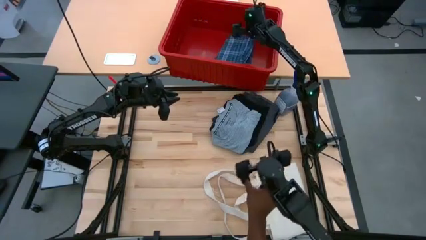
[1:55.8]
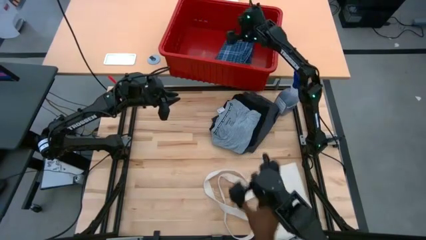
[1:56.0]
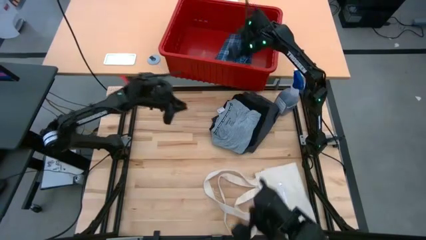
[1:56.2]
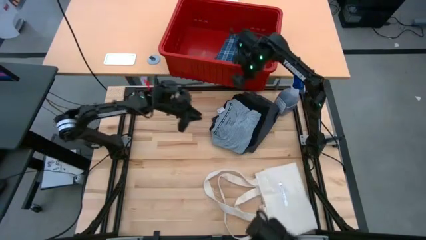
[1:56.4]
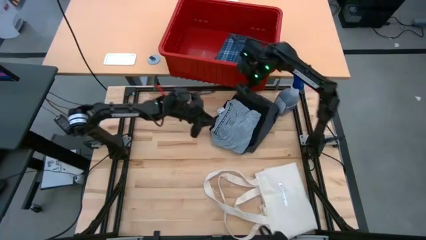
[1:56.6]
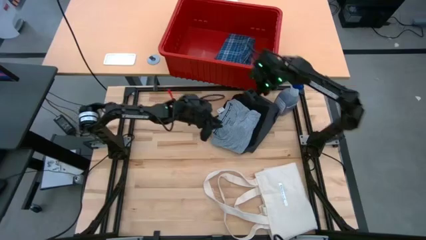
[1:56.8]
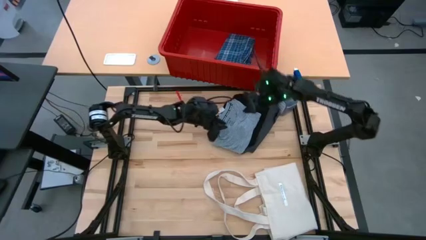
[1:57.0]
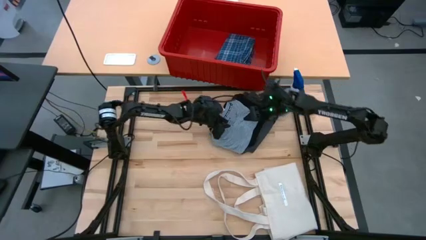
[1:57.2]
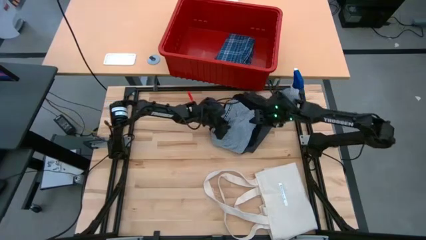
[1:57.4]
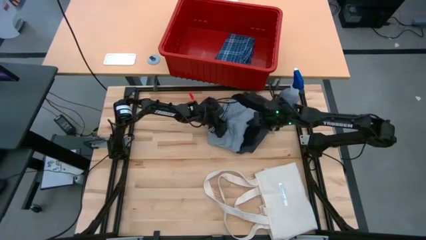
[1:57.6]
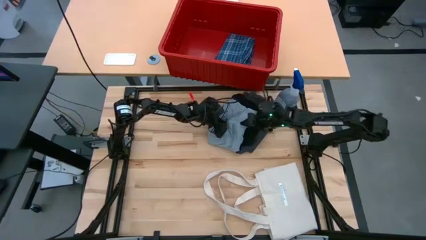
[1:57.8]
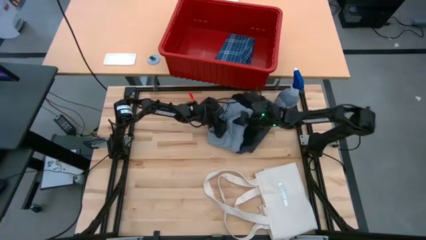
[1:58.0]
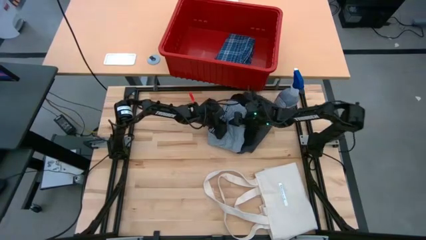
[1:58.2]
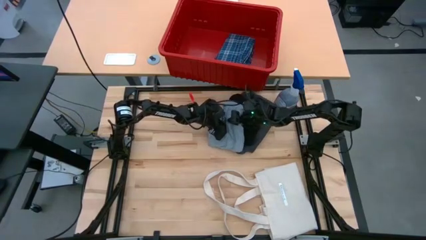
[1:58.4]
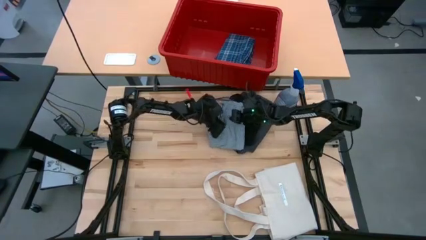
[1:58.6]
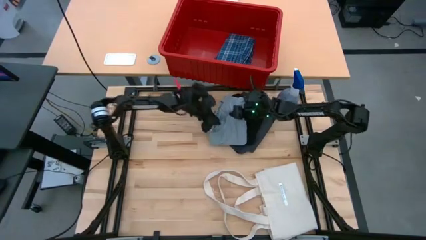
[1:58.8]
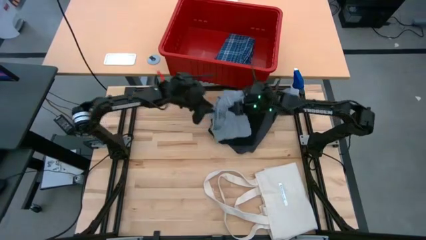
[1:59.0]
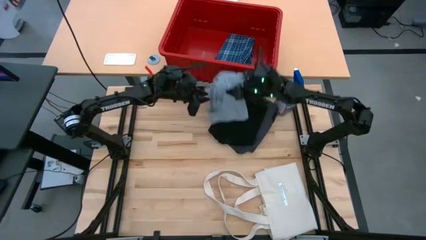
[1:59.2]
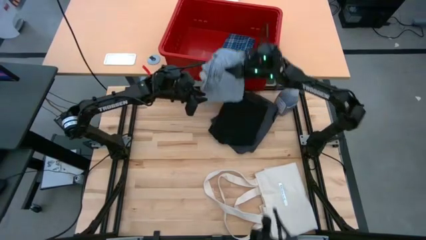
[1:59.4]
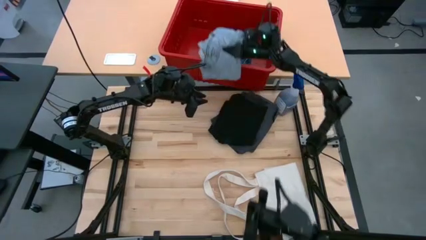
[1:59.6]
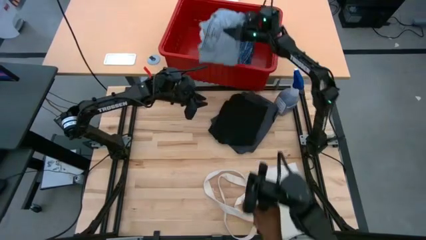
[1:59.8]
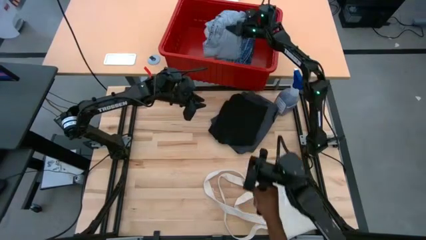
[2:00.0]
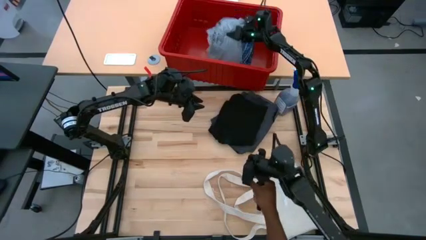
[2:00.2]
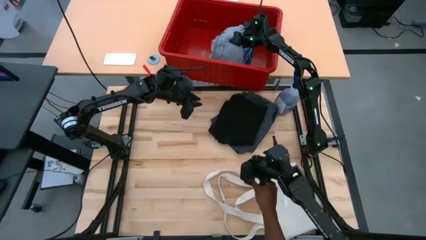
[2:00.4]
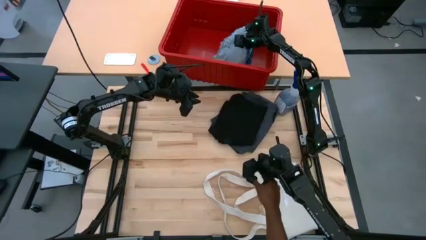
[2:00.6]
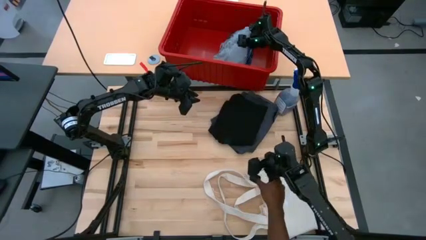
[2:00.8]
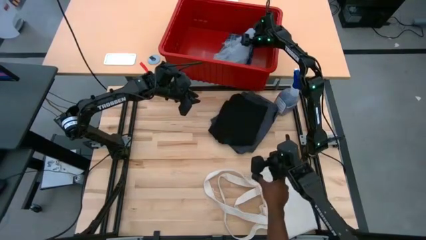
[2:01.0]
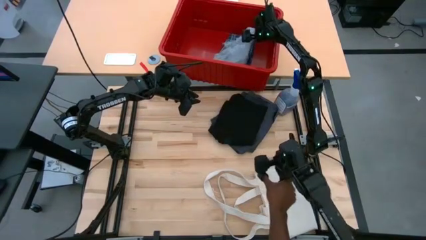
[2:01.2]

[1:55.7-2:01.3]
Task: Fold laundry
Put the gray shirt into the red organizer bin

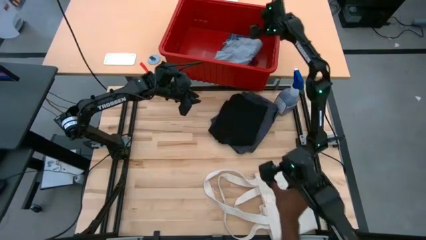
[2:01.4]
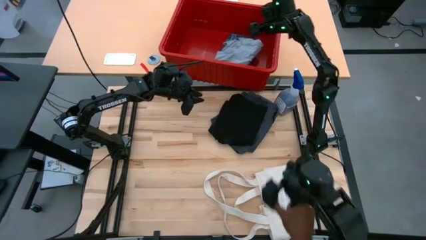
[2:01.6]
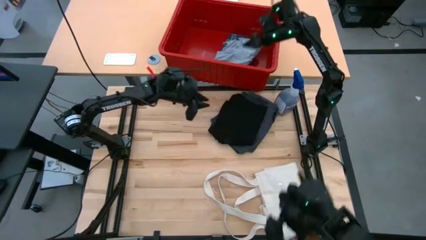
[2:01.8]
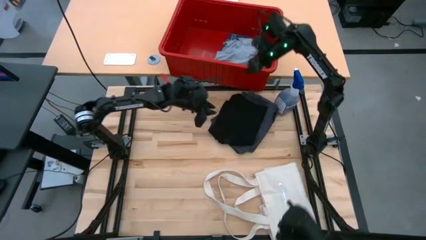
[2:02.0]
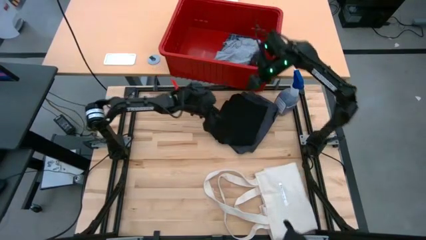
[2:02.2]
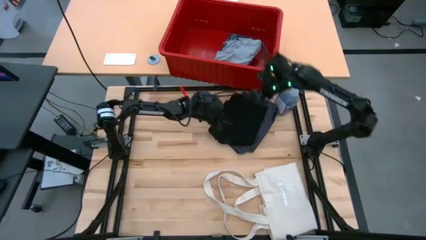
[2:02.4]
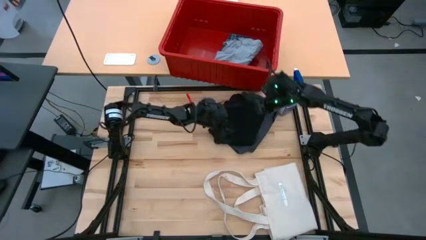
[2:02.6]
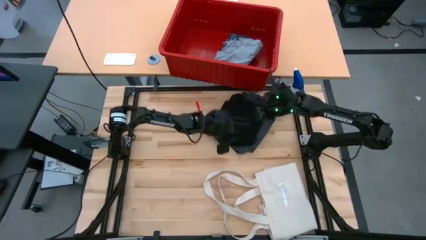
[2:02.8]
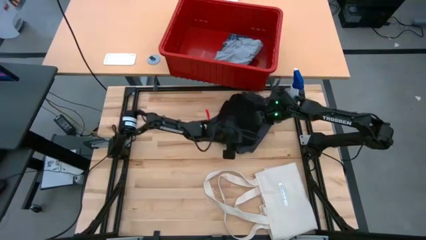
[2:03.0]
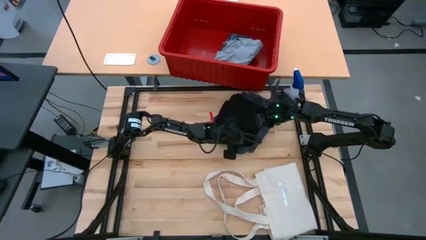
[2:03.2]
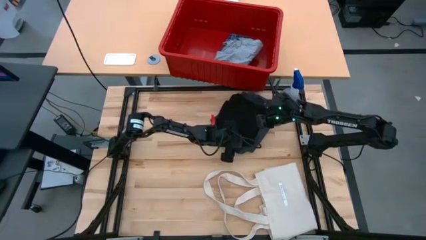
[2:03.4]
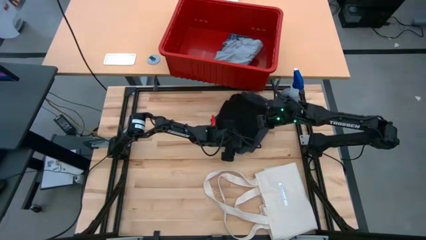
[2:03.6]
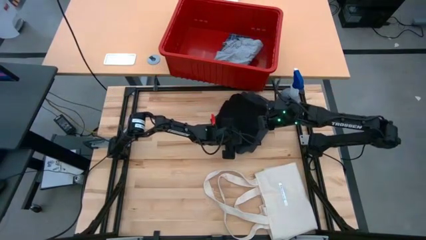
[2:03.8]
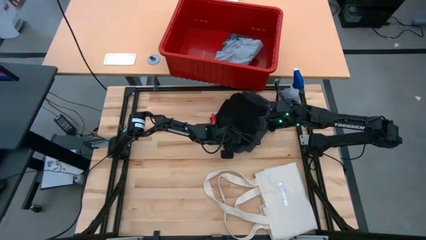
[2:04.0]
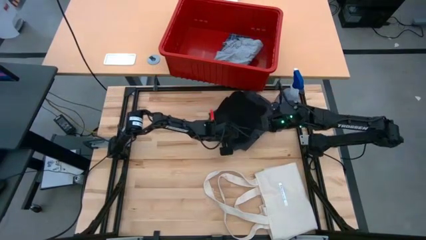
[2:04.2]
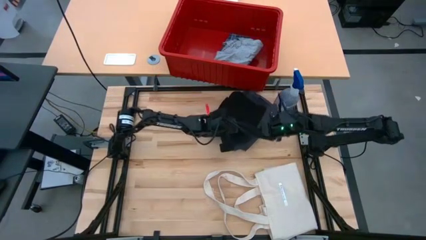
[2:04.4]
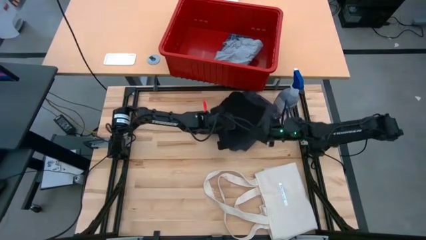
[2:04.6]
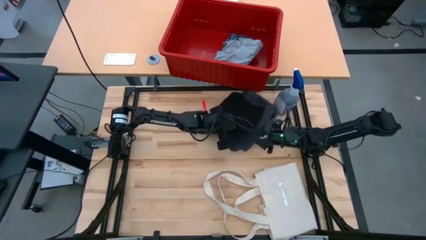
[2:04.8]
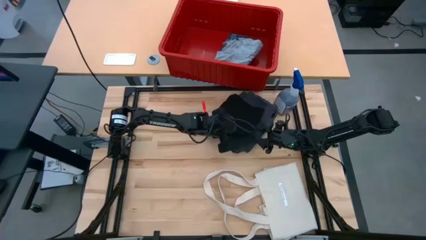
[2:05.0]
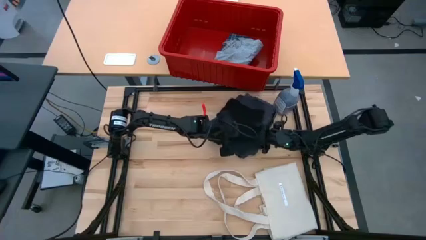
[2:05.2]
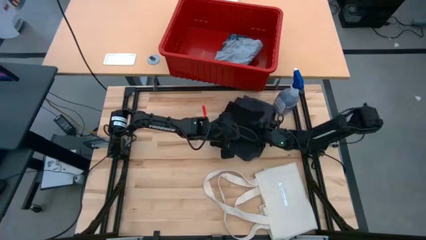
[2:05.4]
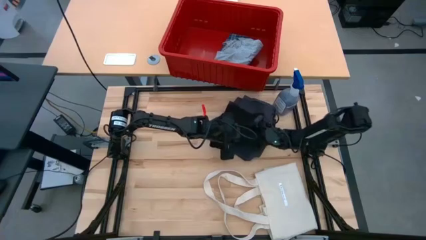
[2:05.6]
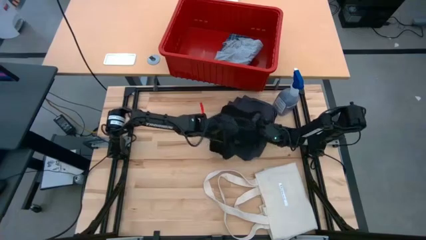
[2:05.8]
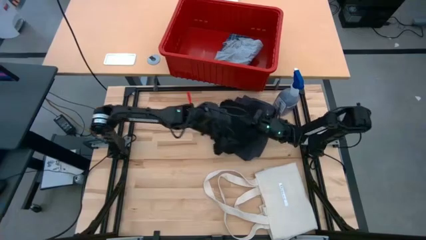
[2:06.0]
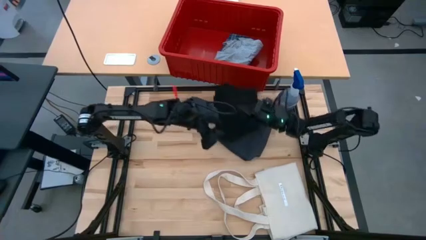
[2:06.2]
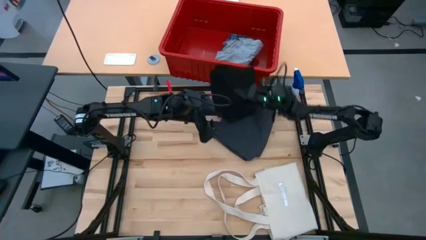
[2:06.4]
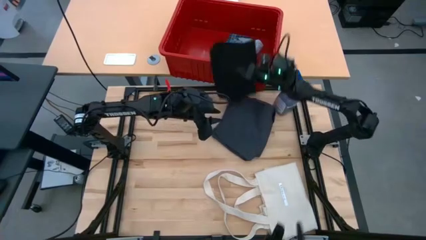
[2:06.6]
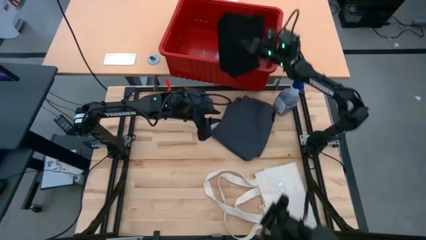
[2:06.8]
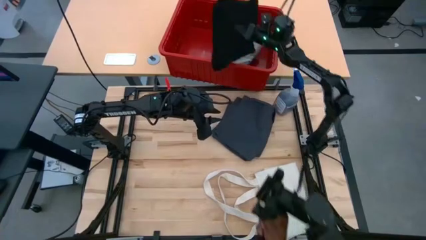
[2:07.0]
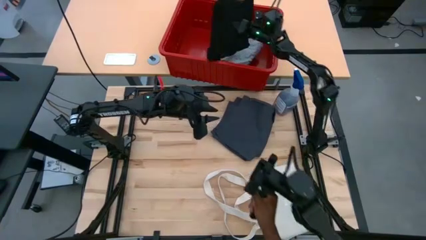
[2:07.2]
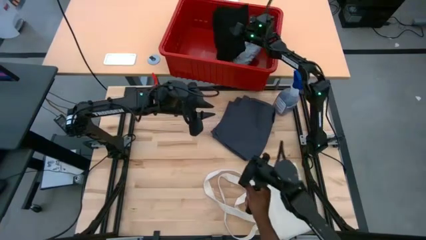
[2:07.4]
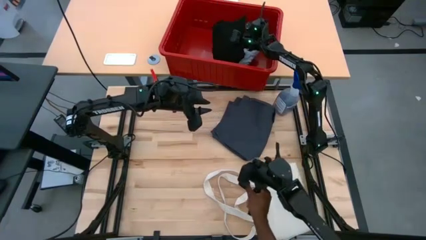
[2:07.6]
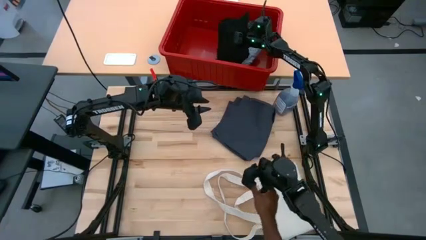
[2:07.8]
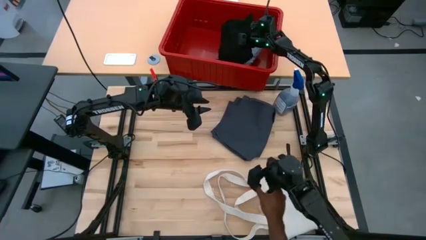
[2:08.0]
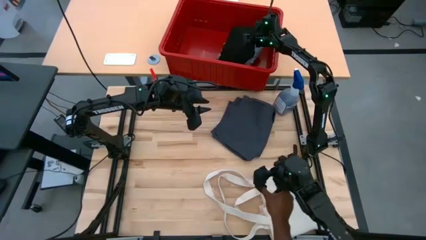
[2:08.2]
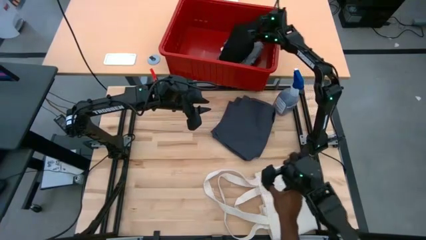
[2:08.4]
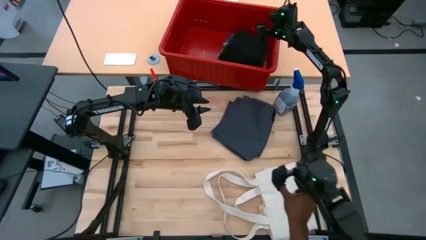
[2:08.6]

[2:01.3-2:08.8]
Put the black shirt into the red organizer bin

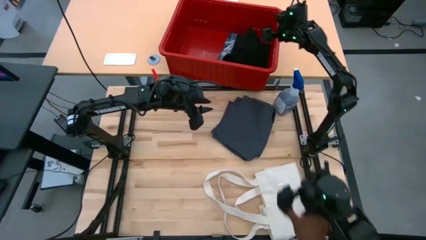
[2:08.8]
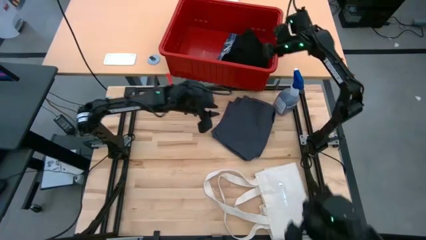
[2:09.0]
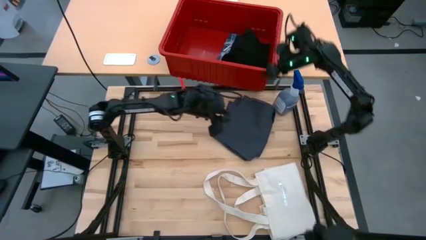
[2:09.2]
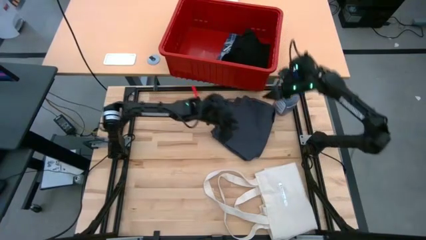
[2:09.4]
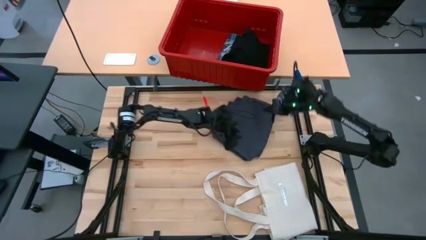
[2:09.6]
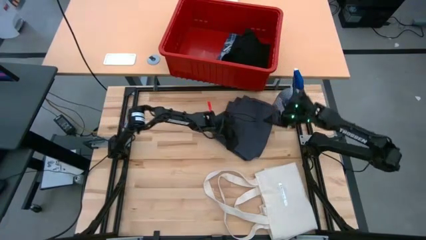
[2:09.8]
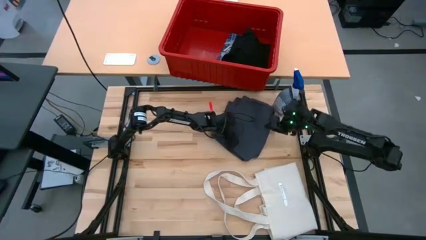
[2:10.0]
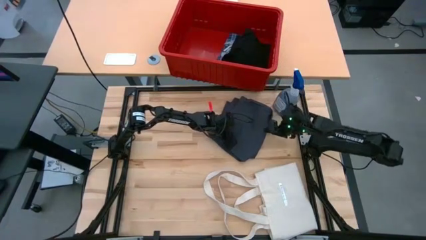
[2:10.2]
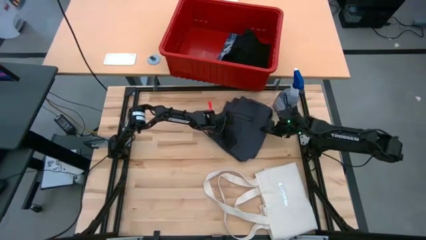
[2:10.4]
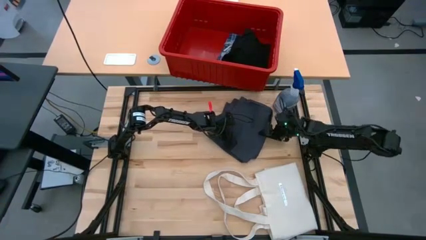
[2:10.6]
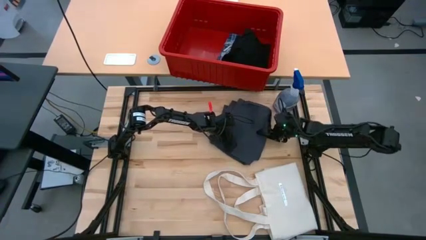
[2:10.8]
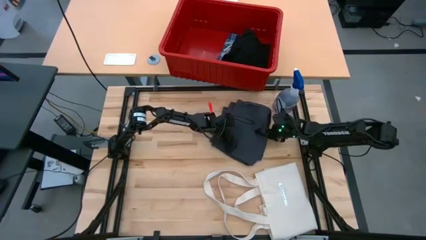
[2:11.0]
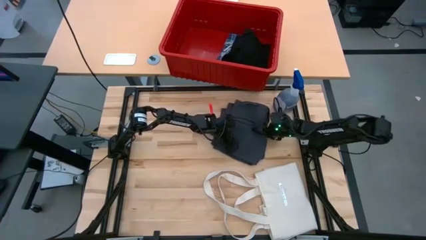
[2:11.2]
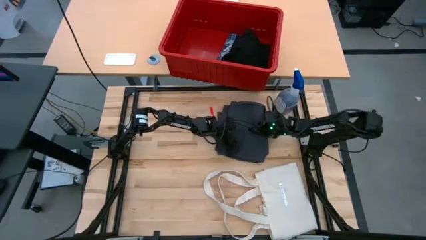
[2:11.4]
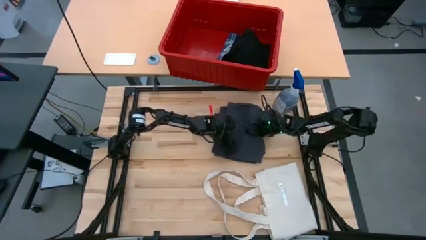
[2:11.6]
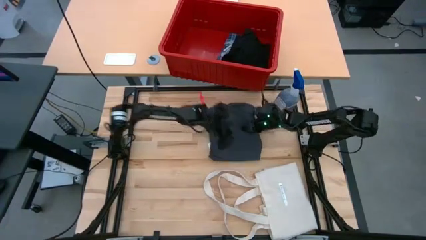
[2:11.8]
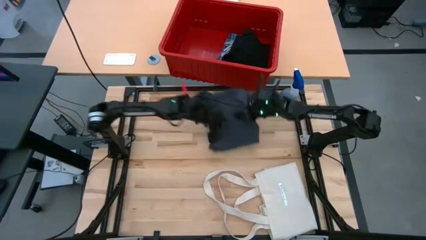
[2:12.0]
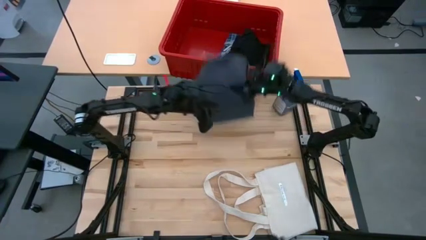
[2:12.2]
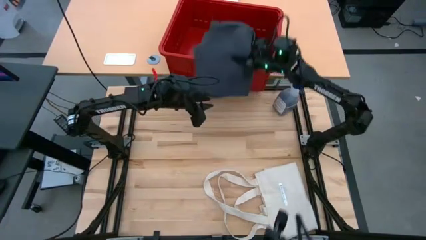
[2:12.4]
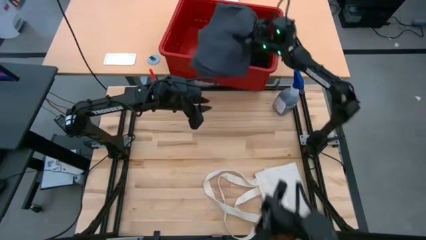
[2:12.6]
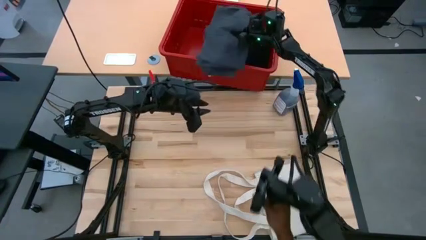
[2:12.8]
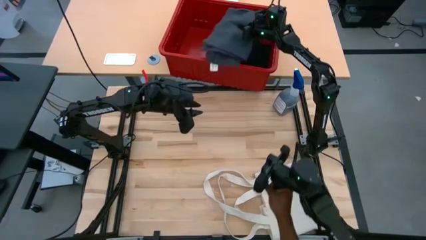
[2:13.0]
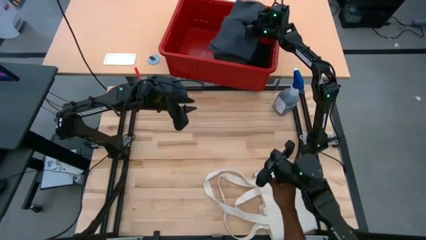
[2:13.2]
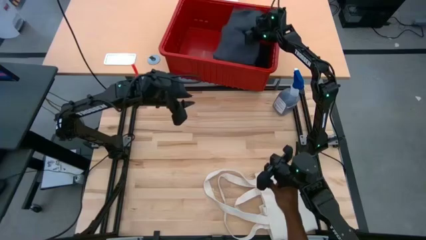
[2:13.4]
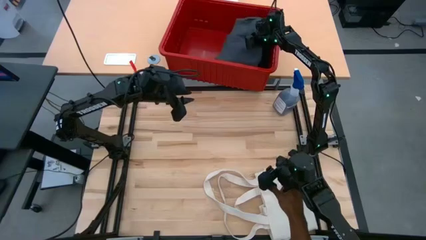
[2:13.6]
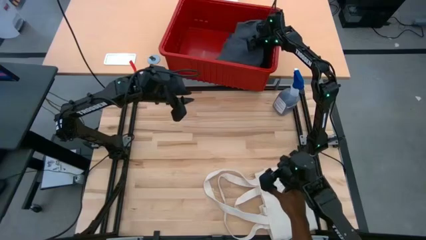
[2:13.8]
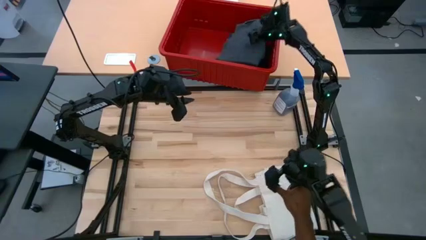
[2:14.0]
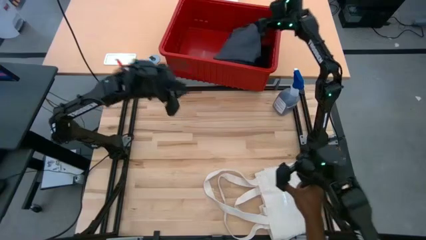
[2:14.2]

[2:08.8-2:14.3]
Put the dark blue shirt into the red organizer bin
